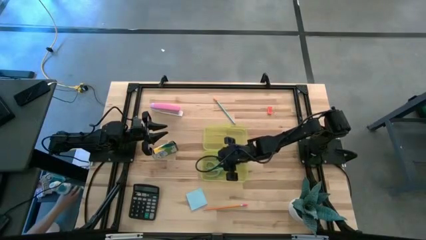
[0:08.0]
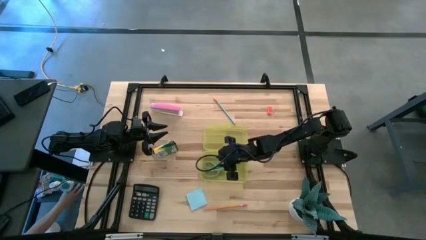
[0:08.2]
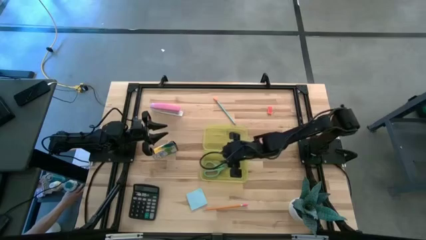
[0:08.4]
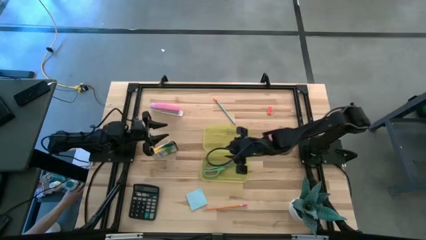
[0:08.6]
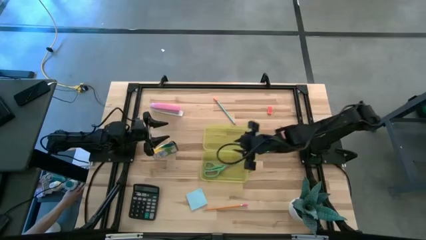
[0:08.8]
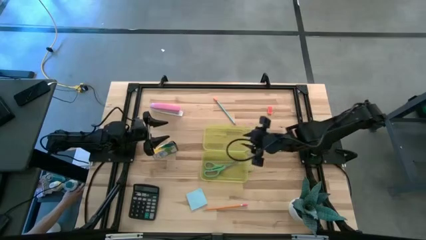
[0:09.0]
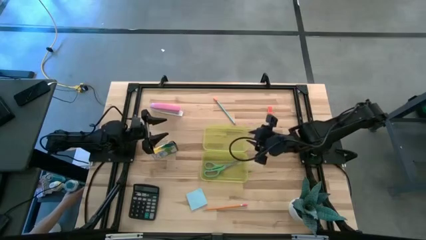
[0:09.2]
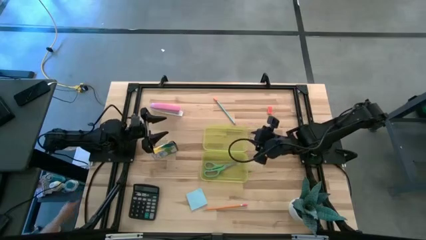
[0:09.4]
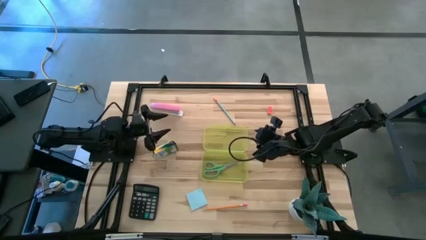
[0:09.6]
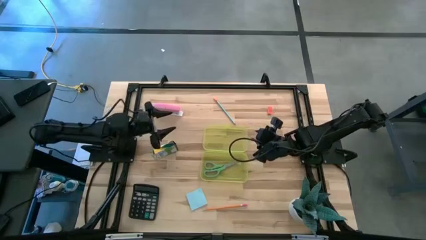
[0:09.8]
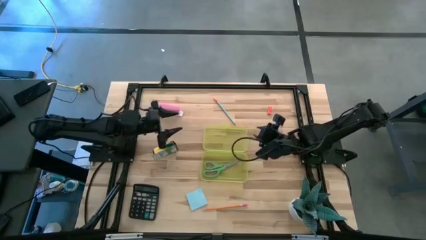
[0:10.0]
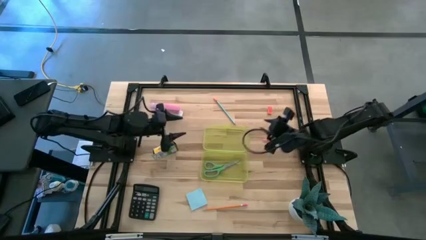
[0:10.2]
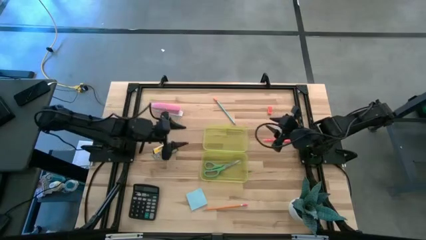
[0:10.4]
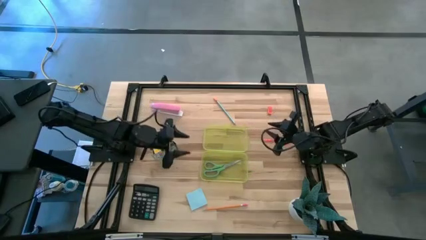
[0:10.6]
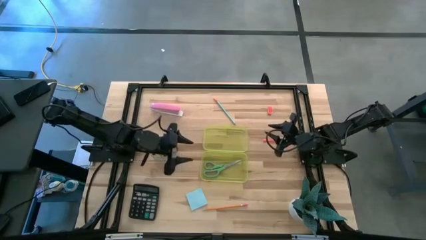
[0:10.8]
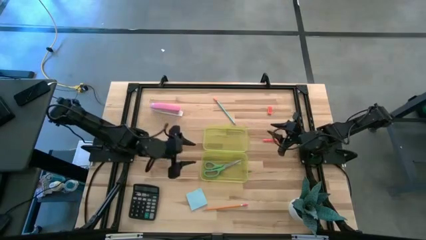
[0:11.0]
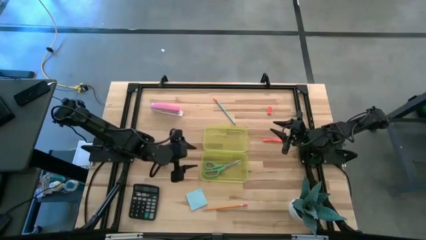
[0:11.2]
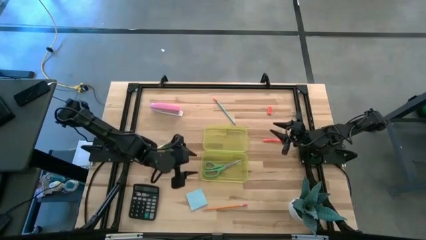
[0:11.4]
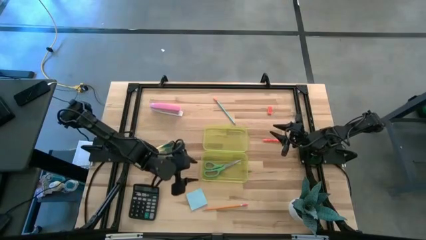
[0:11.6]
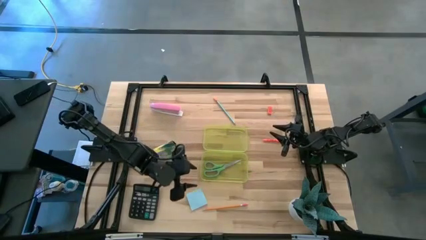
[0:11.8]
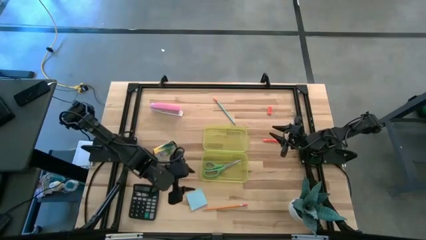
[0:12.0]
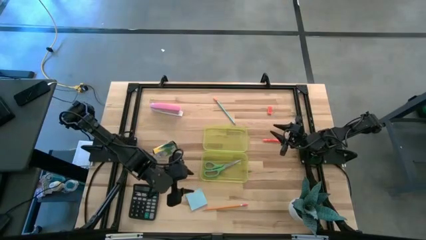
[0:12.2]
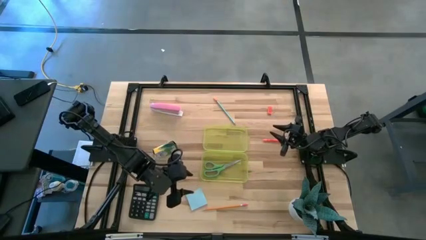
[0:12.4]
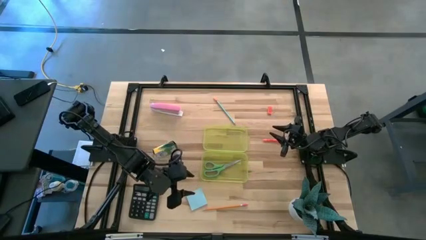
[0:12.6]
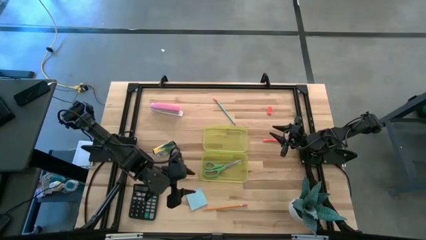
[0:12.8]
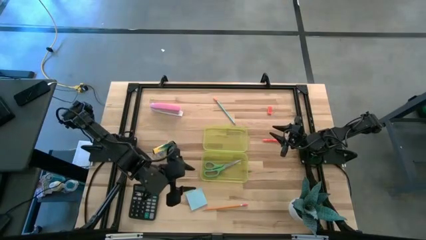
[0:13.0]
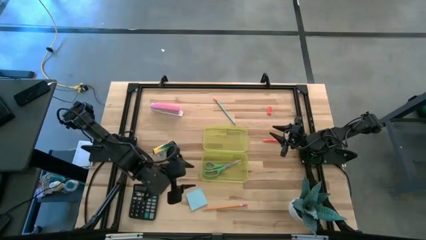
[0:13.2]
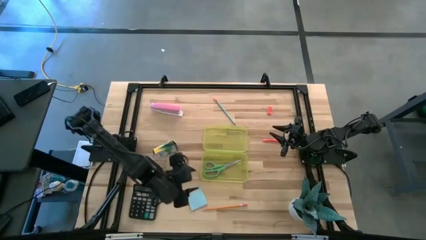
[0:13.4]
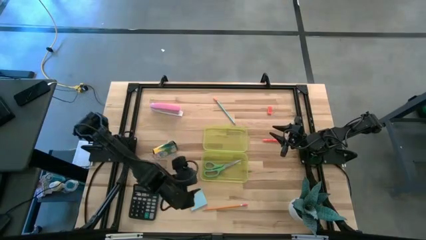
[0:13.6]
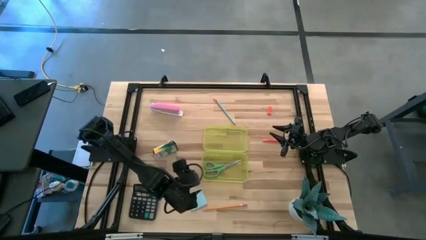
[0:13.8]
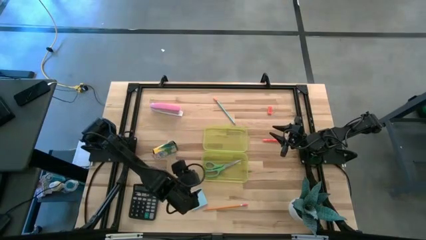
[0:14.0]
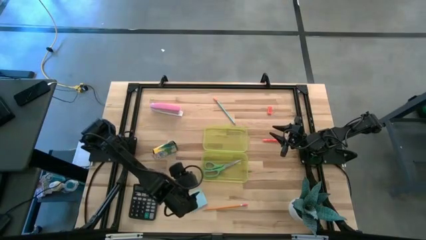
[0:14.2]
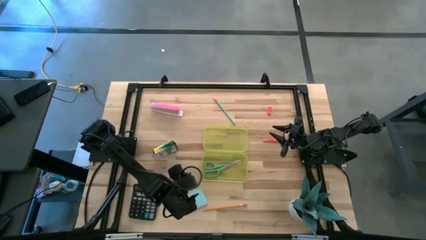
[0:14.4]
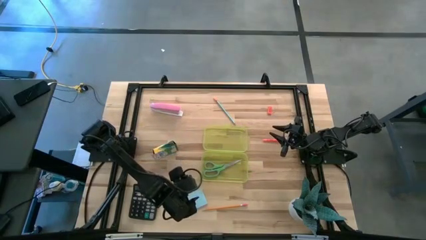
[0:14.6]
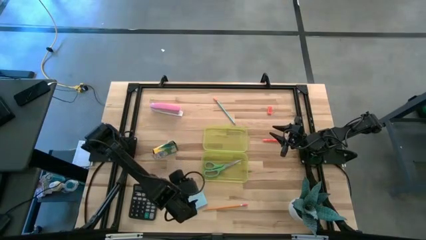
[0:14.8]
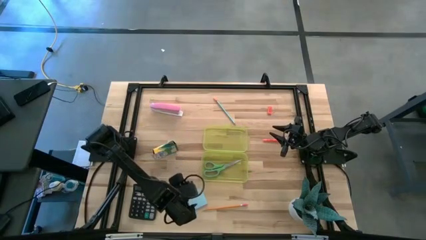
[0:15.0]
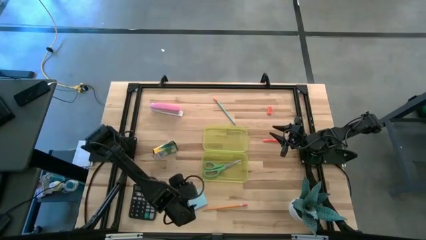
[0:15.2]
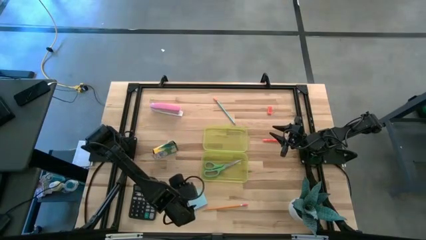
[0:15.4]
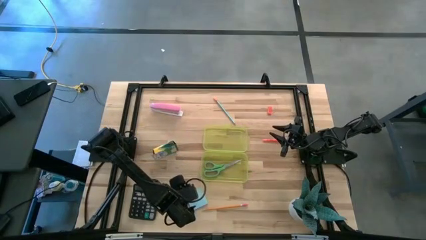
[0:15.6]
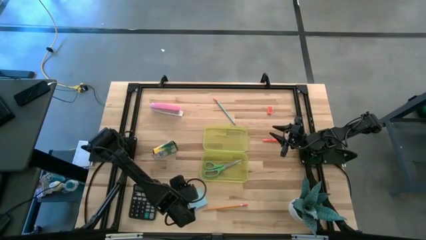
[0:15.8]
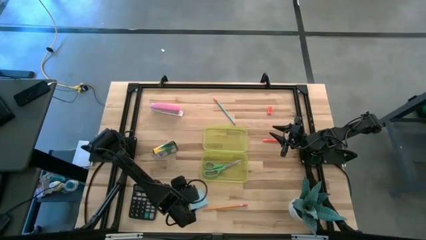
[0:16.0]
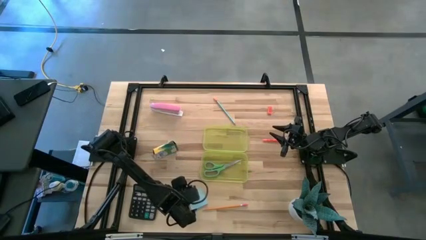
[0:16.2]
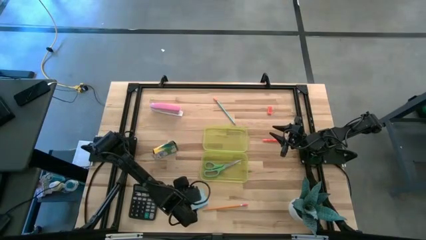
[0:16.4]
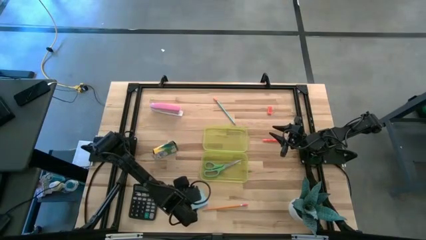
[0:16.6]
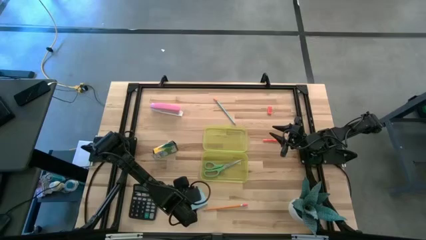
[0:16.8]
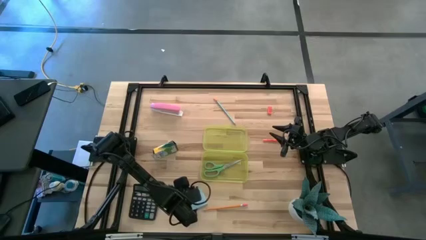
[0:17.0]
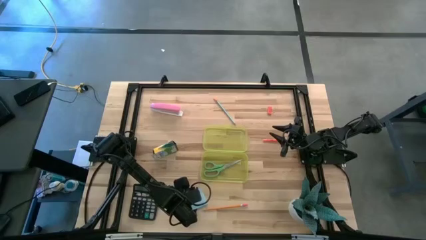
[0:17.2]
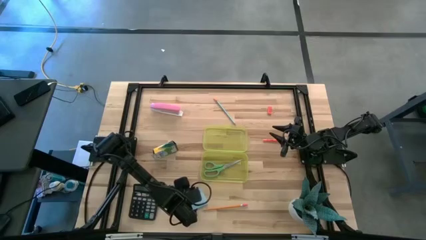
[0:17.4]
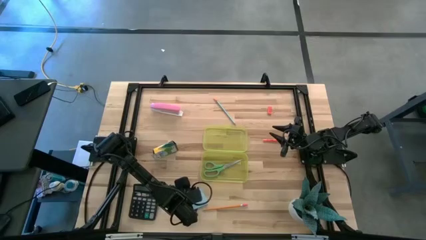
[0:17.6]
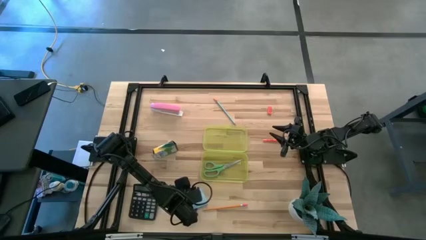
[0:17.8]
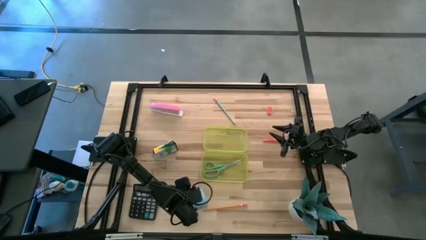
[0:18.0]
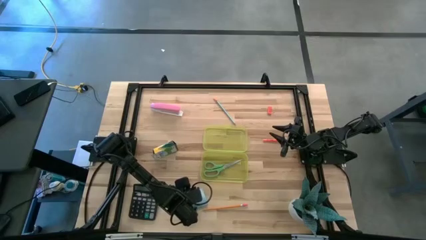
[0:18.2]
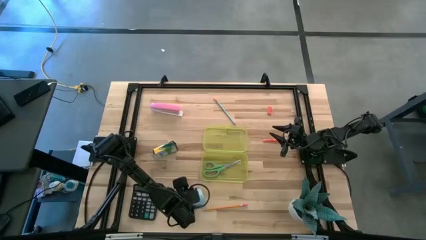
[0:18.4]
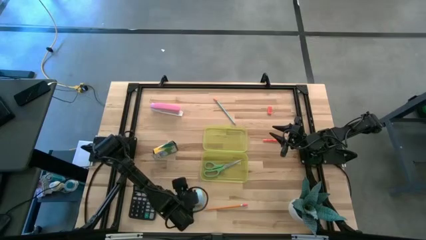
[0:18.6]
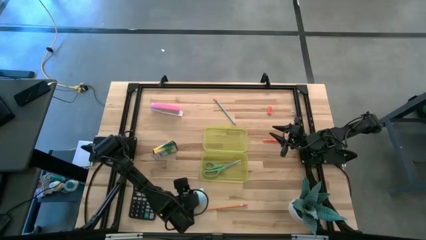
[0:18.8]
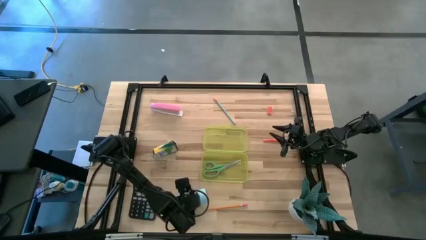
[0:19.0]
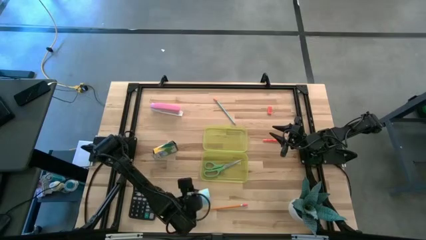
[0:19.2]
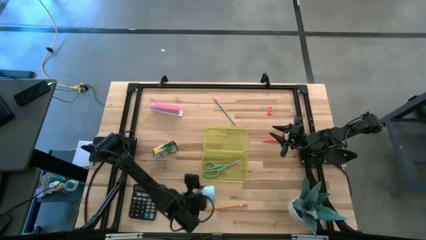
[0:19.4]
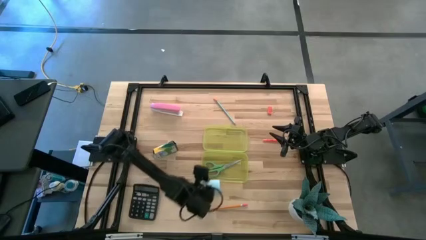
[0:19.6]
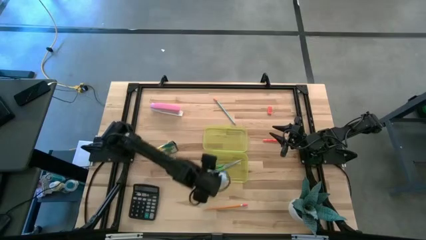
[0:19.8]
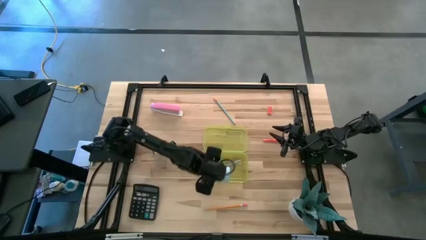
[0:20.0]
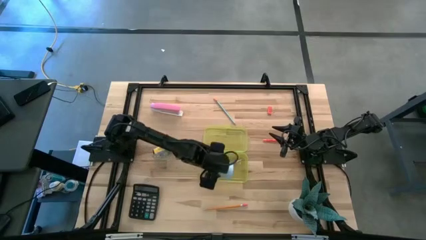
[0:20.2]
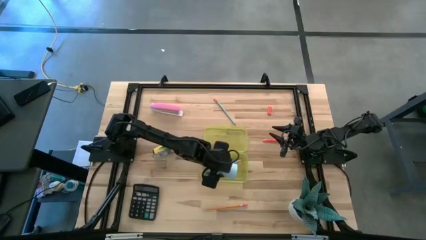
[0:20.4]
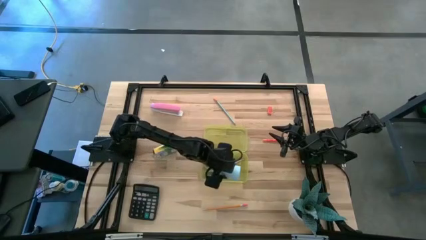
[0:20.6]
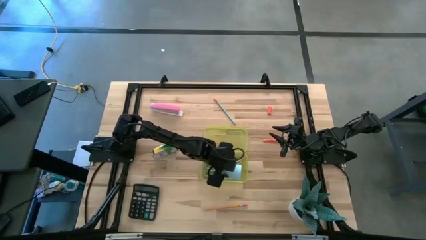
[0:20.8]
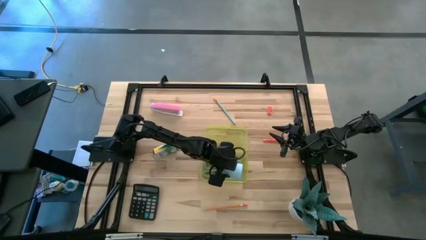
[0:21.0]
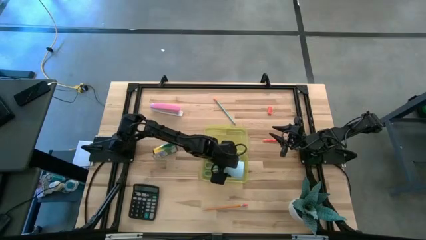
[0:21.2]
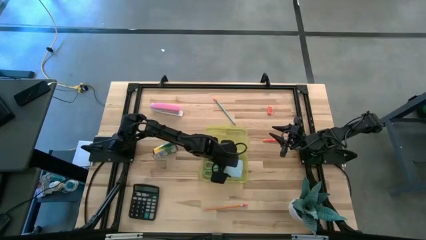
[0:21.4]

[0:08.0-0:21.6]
Task: Pack school essentials
Put the light blue sticky notes into the supply box
